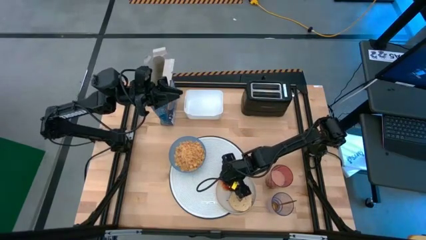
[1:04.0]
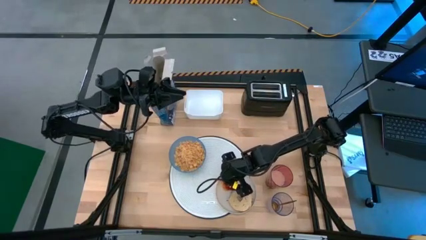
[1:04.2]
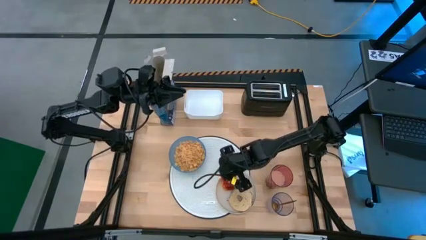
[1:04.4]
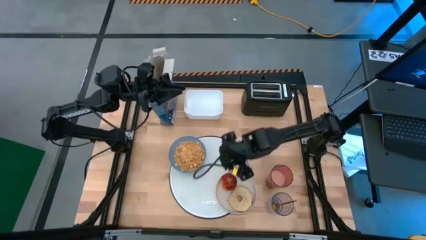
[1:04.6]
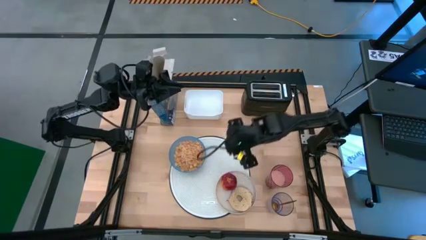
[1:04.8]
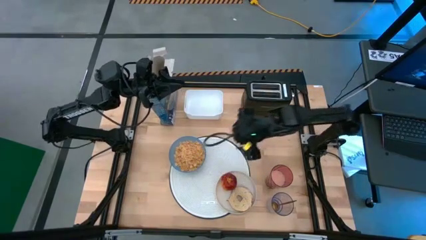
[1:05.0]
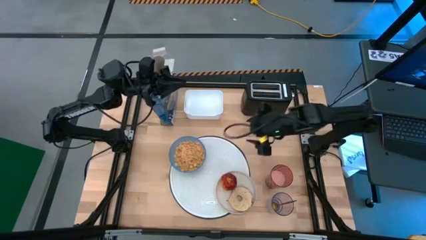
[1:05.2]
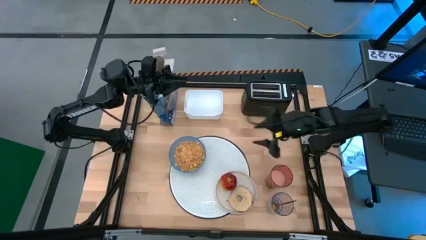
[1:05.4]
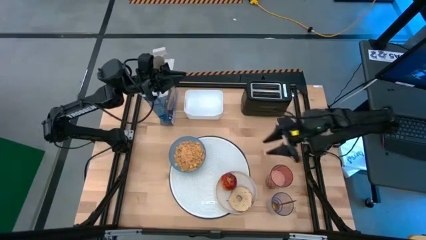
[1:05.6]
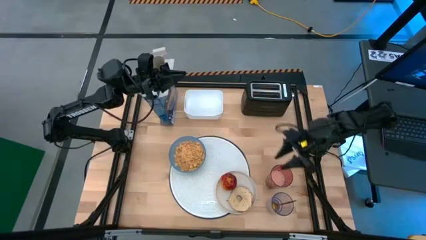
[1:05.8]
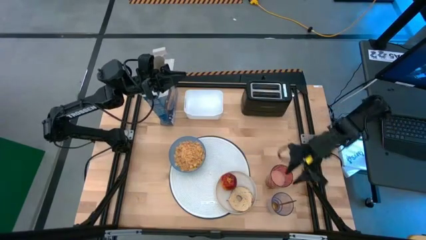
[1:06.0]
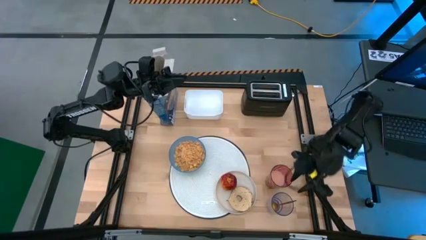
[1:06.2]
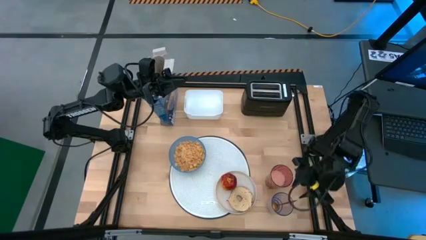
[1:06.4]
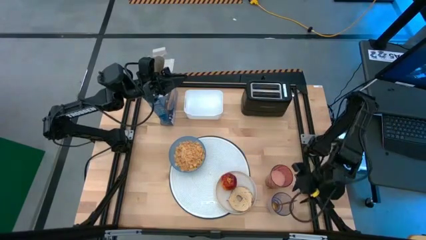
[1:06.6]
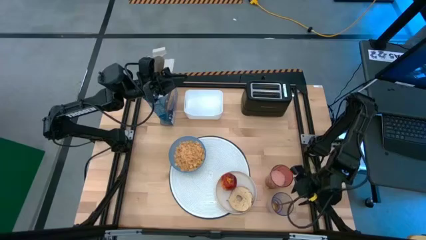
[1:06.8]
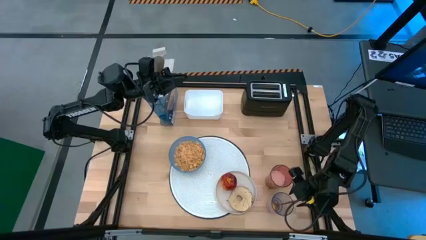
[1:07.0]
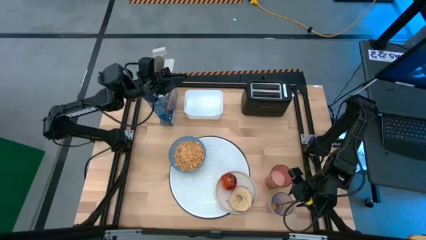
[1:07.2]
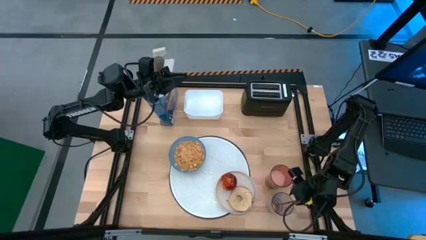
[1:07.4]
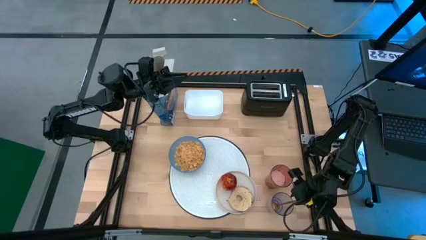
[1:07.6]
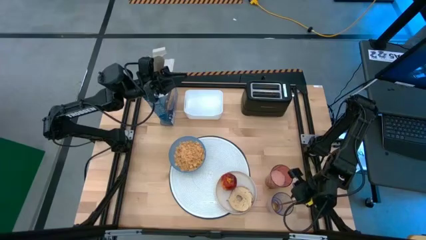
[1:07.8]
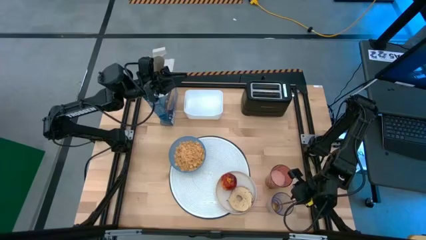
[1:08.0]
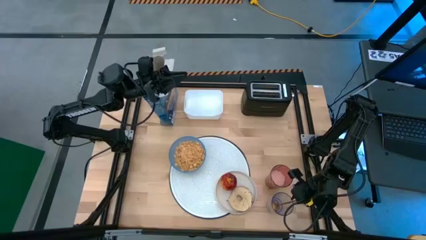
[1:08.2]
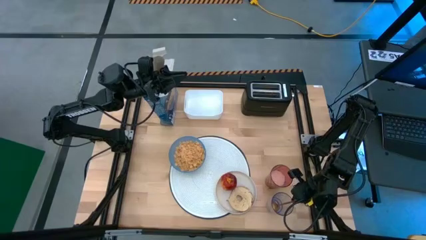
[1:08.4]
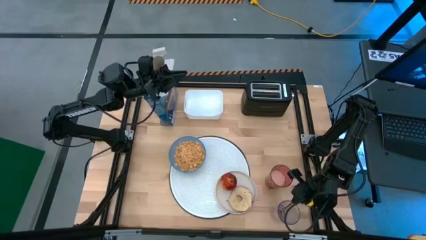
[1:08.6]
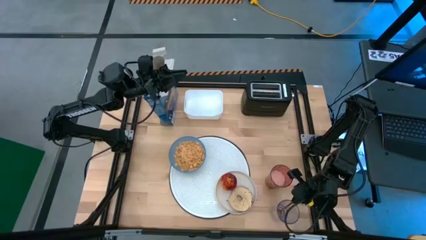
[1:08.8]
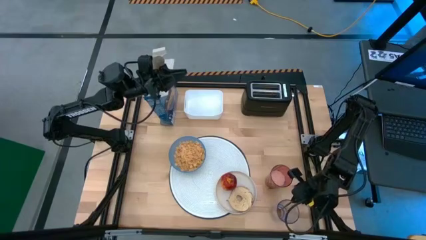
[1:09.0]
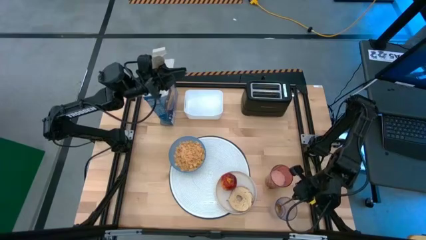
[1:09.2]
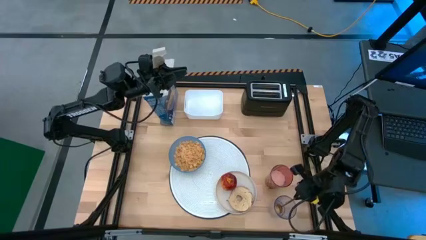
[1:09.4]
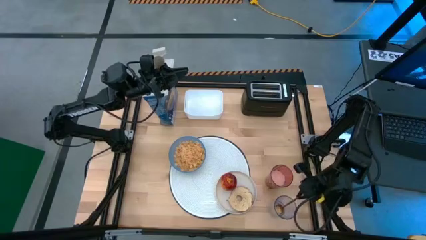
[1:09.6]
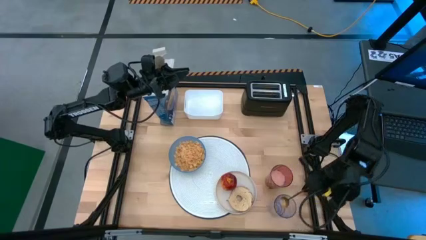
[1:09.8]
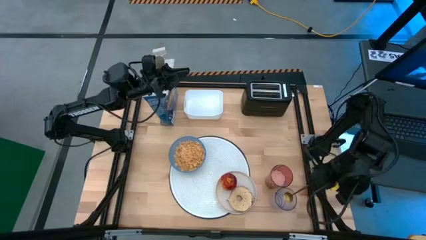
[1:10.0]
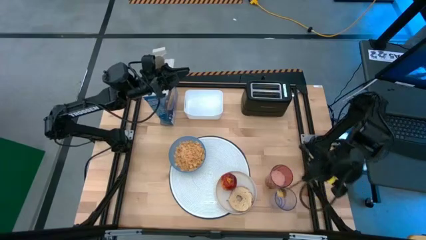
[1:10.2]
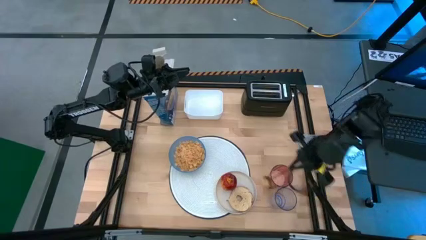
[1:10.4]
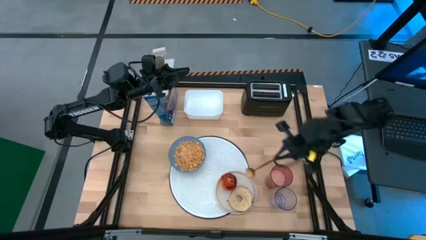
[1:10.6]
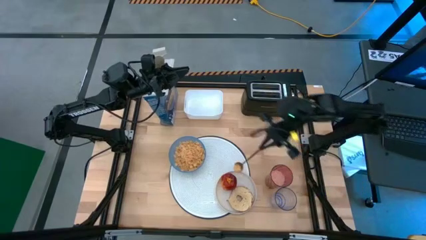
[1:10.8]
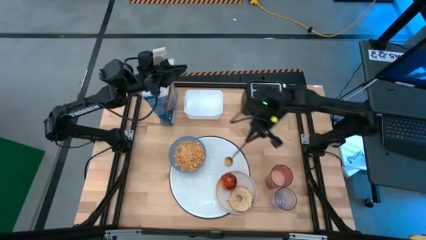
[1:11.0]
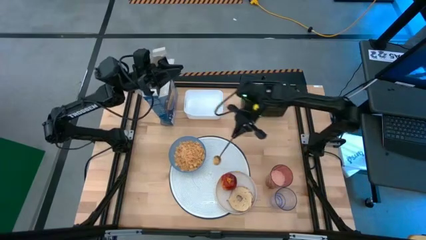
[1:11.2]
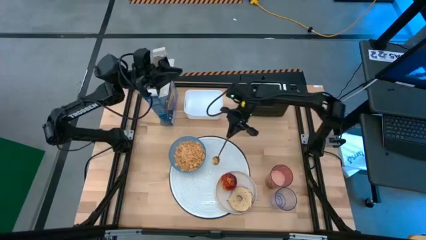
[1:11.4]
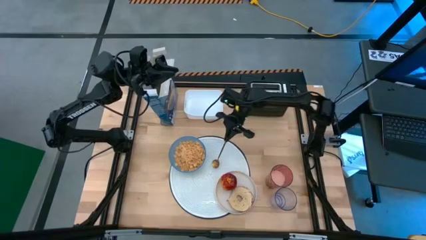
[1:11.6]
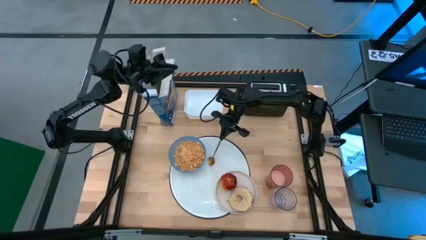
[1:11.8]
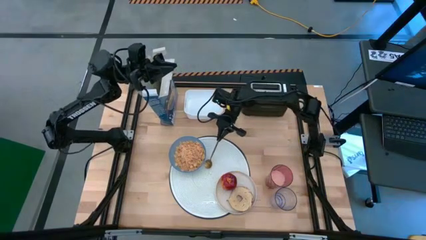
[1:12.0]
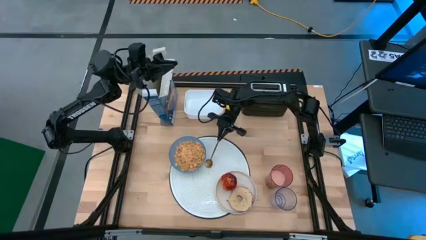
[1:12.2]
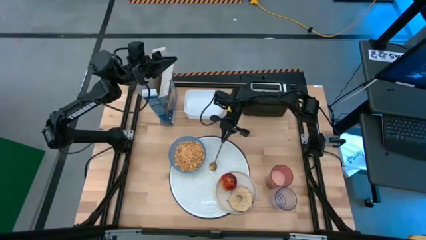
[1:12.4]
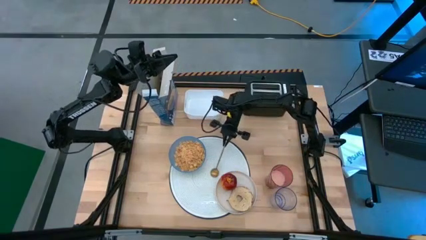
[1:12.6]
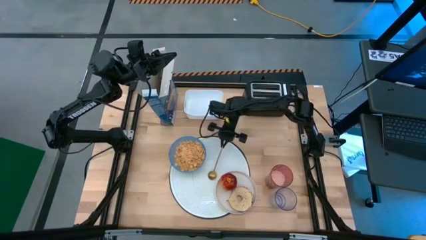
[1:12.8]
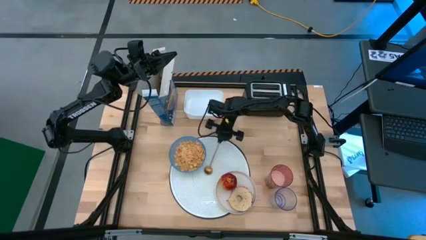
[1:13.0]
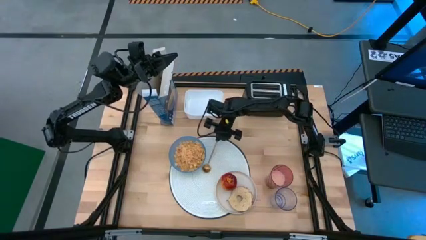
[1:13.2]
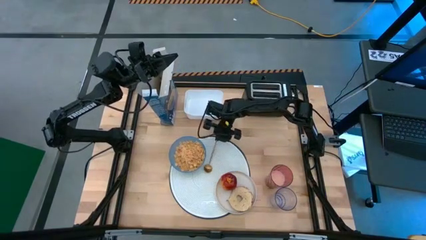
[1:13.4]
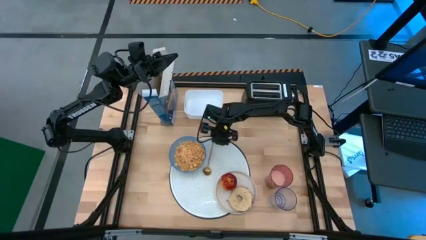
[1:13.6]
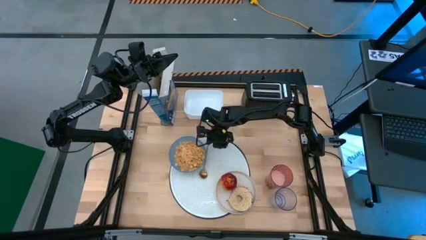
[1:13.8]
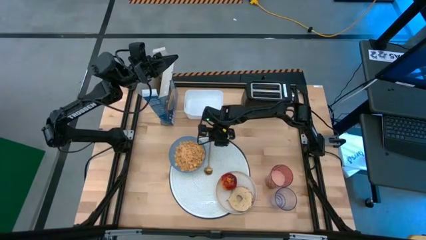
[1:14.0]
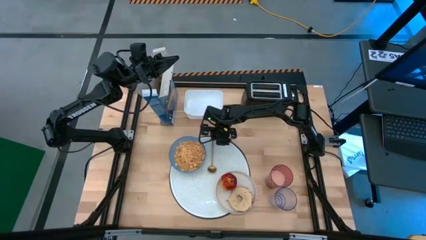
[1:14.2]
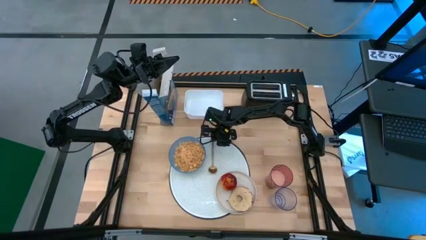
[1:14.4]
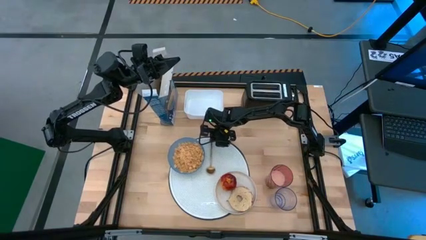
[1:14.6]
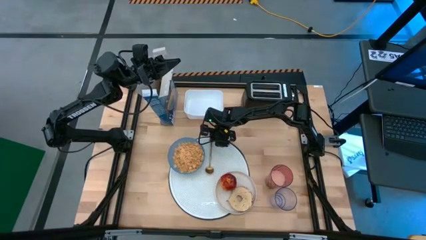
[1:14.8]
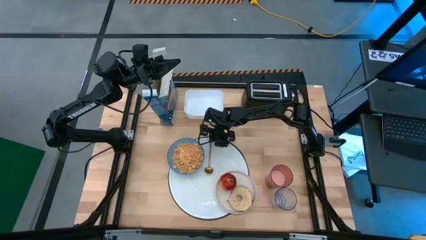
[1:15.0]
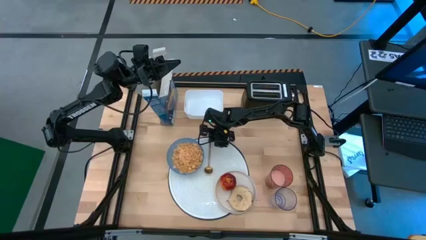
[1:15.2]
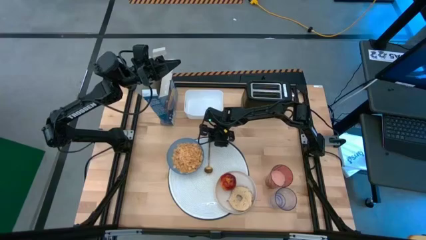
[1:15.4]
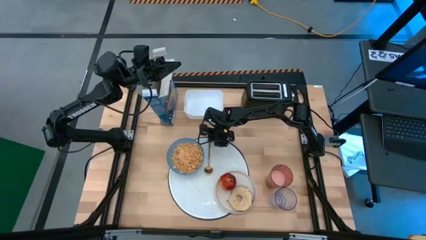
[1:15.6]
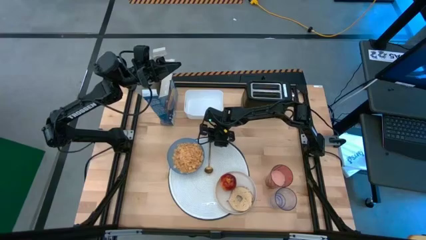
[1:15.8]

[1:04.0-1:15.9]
Task: Arrange a breakfast setting
Put the gold spoon on the white table mat
